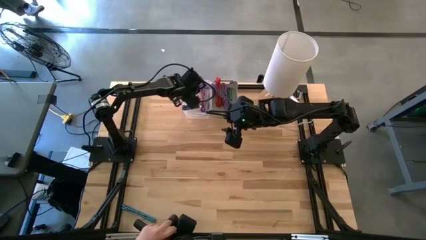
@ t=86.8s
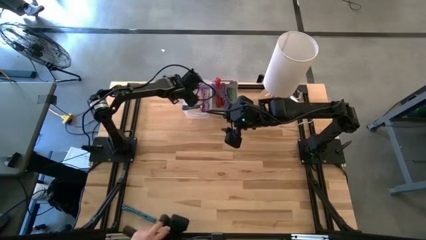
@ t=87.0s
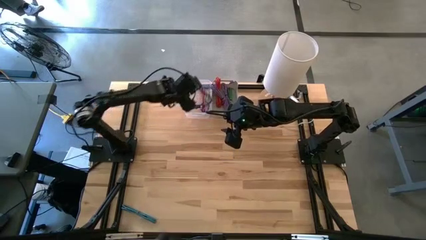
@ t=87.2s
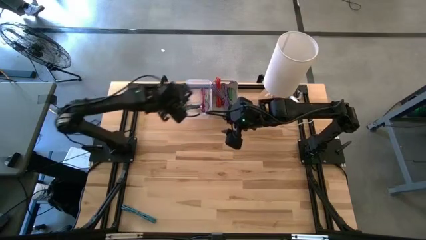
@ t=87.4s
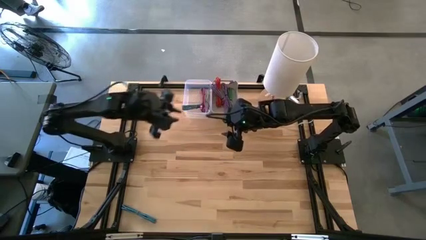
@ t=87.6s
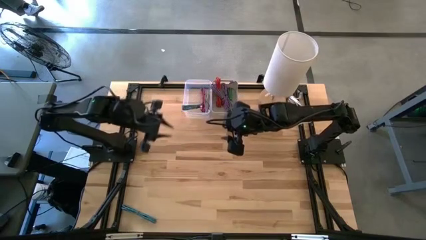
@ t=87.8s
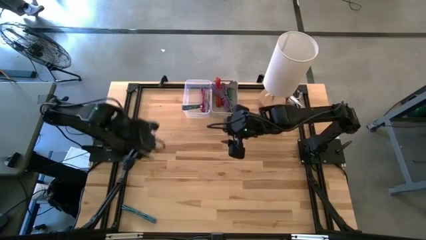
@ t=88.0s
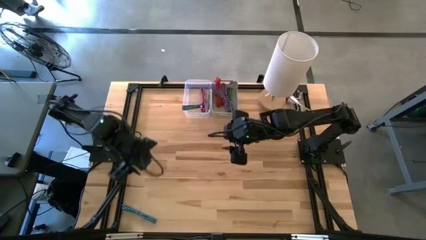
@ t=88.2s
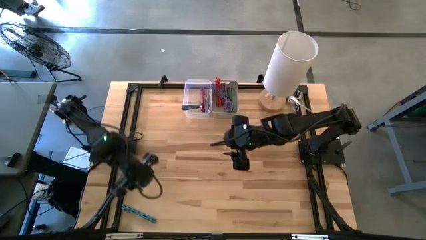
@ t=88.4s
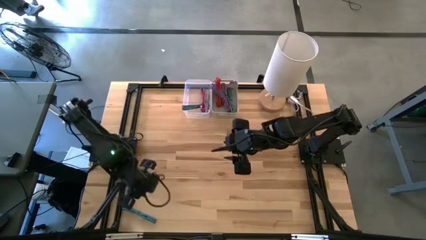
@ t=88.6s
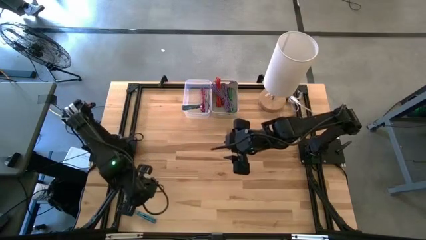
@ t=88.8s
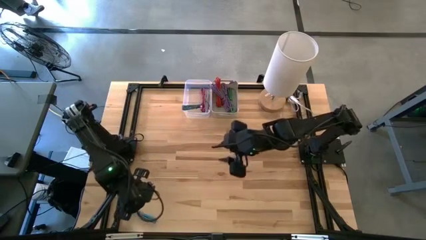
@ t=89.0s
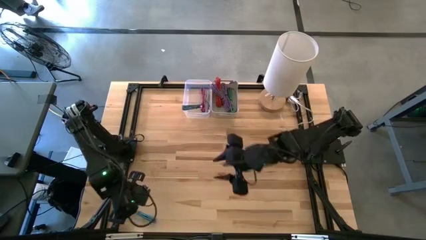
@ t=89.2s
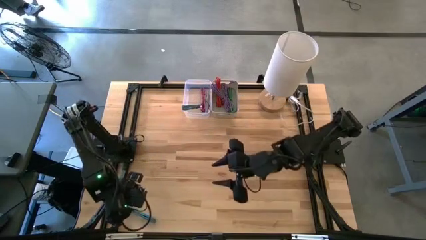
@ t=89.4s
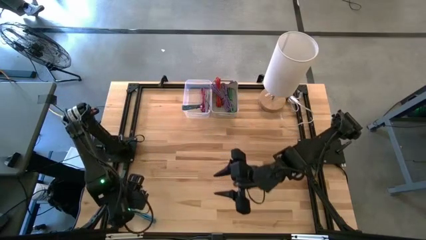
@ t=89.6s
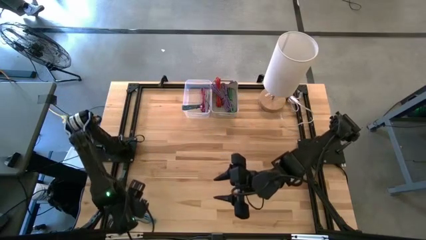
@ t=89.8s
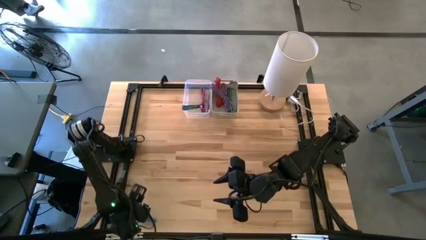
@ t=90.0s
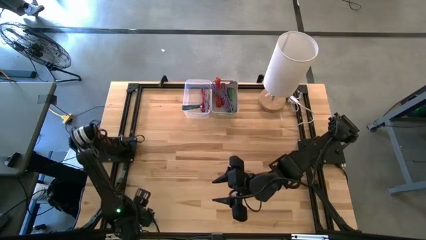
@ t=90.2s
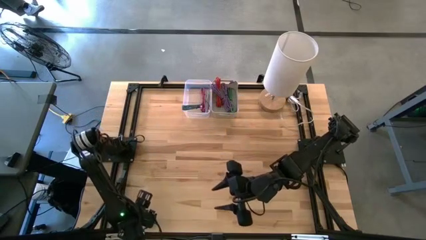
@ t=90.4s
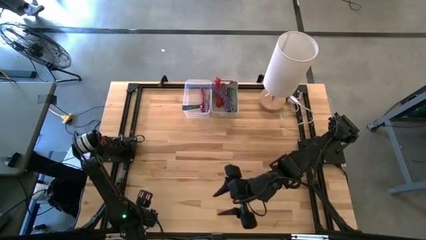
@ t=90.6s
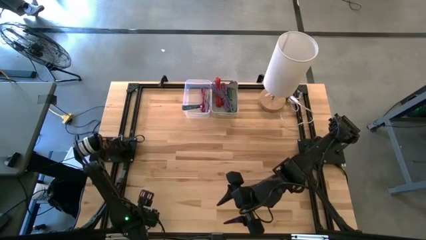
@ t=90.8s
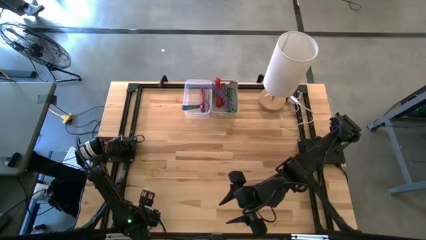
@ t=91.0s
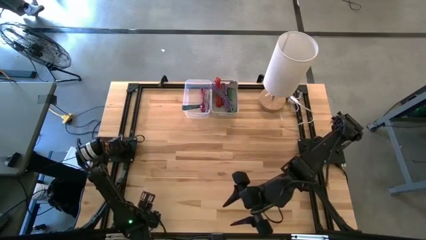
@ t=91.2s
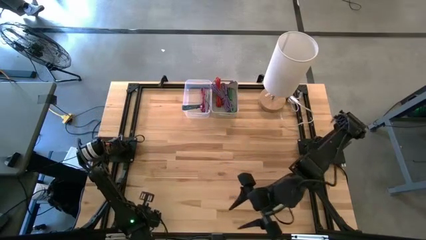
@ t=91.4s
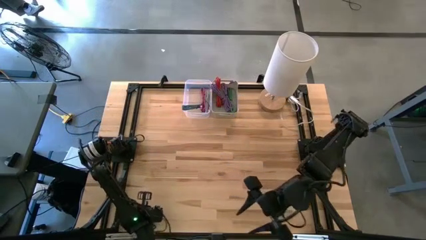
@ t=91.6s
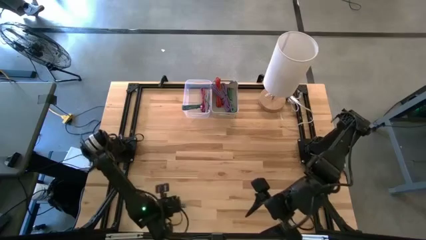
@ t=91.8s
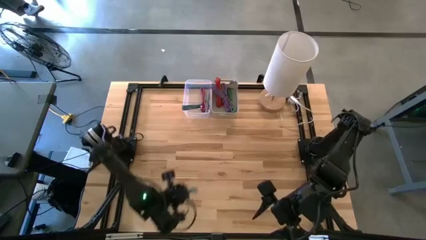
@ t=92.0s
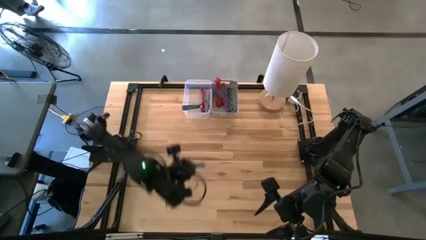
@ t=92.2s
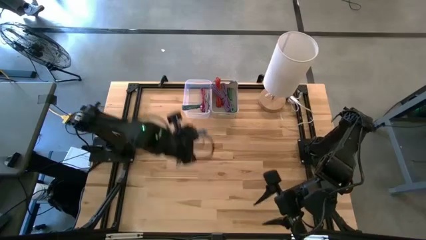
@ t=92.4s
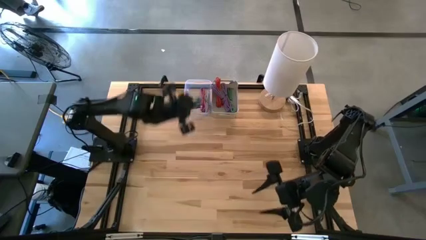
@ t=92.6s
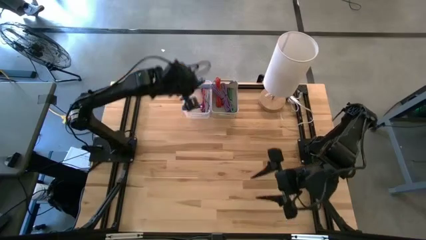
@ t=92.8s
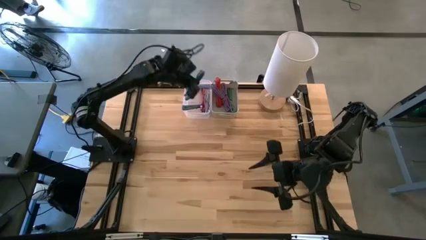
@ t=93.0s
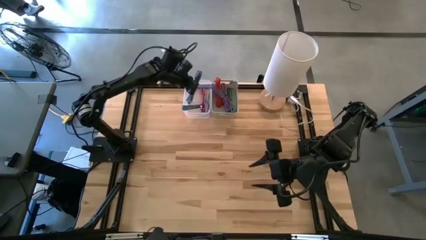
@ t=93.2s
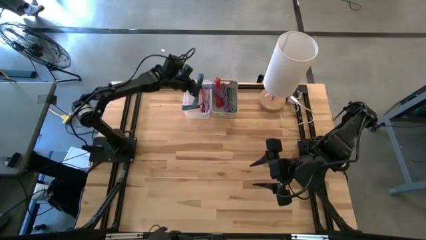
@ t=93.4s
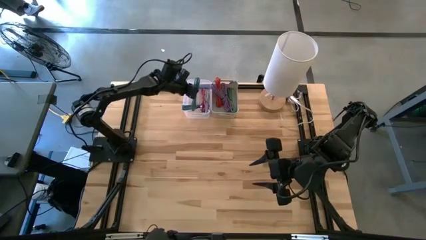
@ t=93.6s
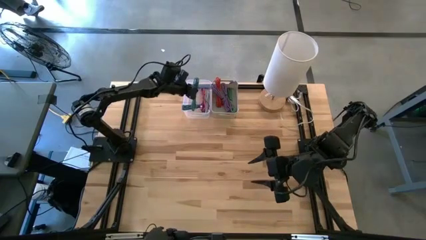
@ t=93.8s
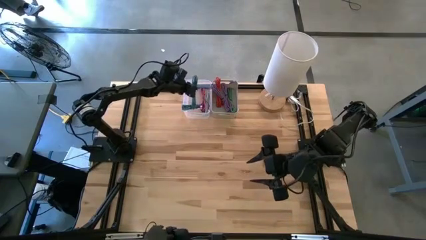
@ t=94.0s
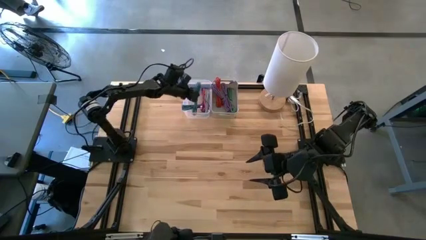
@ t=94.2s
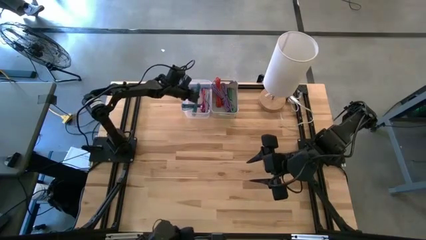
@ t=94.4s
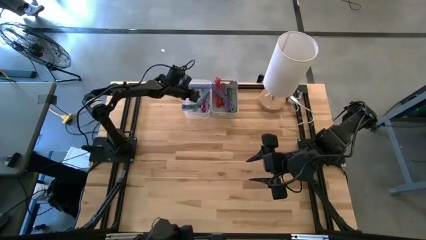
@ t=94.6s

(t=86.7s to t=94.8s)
Task: Pick & Place USB Port
Put the blue and black charger cable into the transparent bin

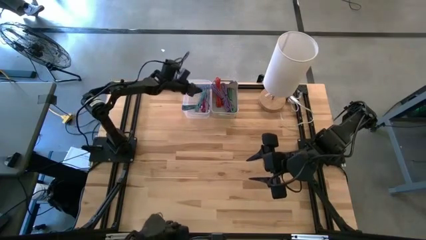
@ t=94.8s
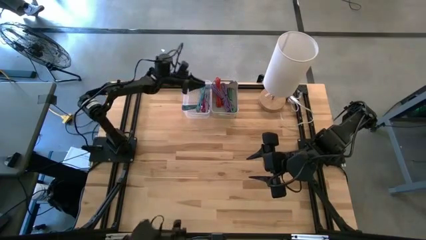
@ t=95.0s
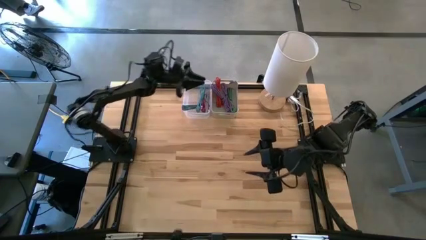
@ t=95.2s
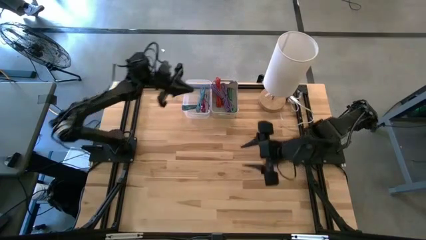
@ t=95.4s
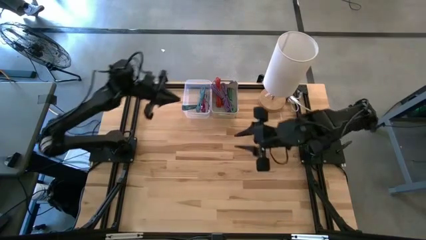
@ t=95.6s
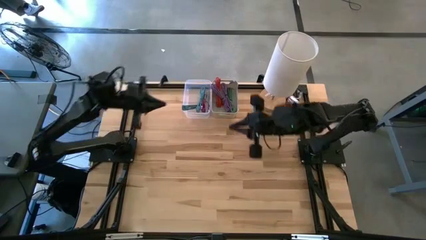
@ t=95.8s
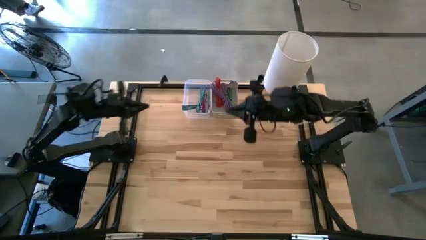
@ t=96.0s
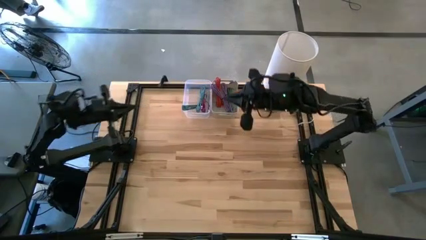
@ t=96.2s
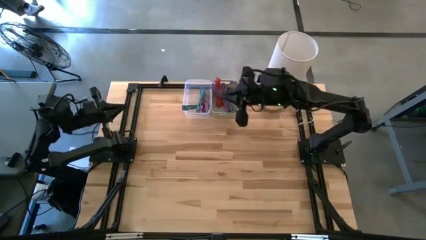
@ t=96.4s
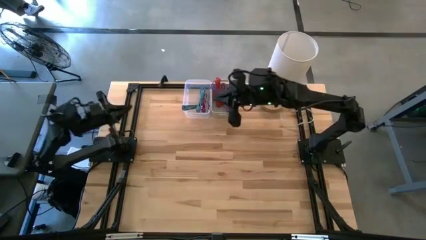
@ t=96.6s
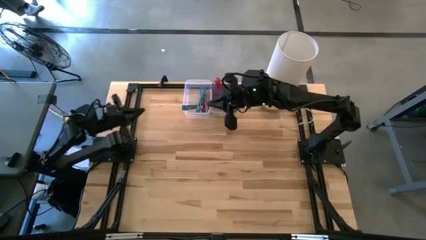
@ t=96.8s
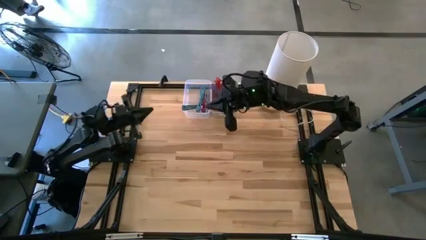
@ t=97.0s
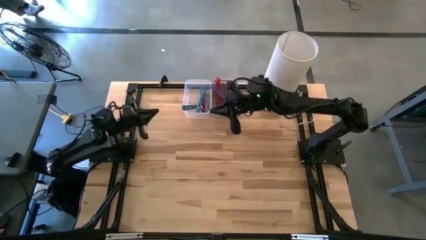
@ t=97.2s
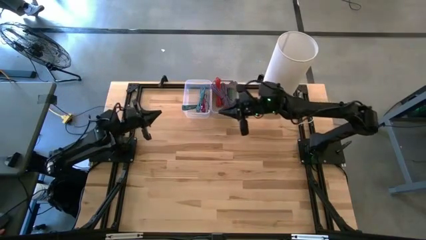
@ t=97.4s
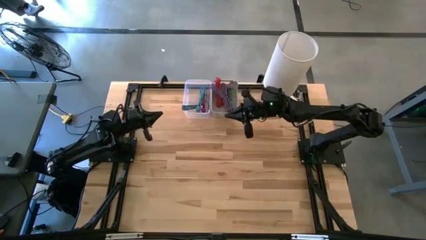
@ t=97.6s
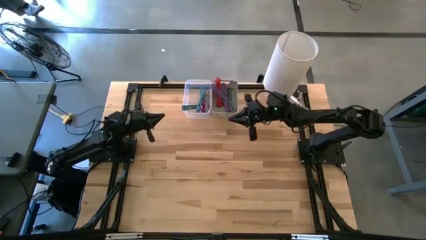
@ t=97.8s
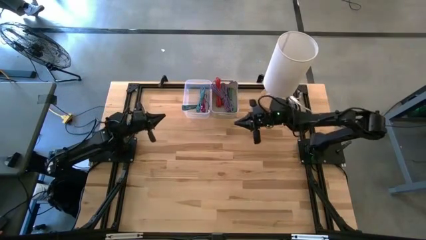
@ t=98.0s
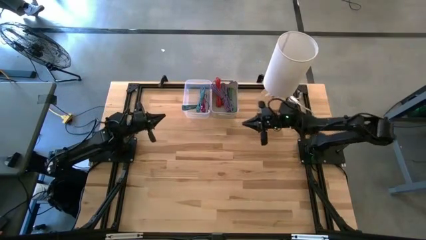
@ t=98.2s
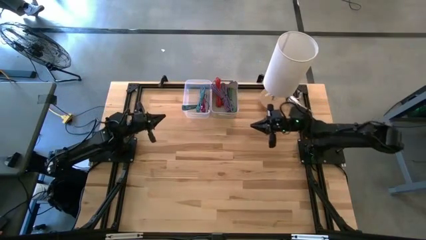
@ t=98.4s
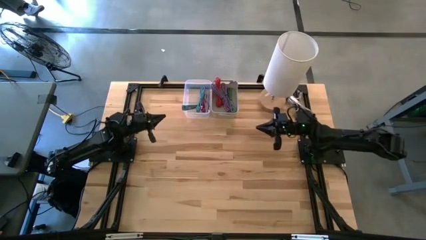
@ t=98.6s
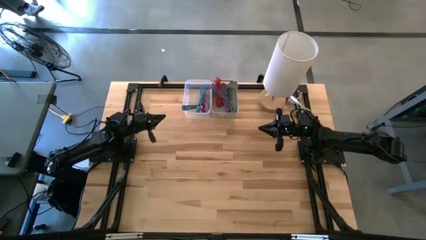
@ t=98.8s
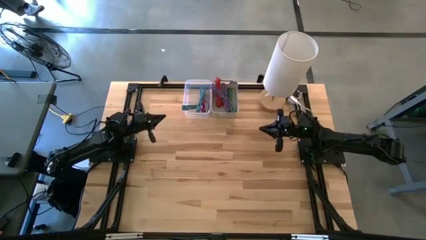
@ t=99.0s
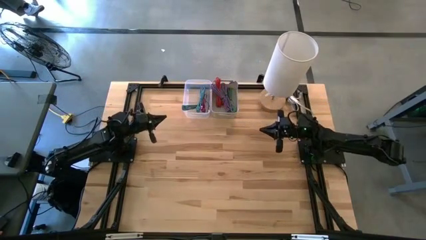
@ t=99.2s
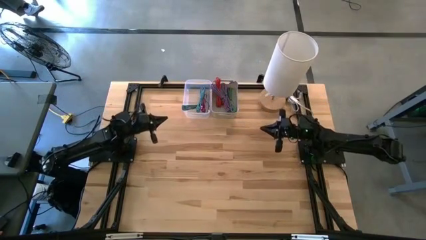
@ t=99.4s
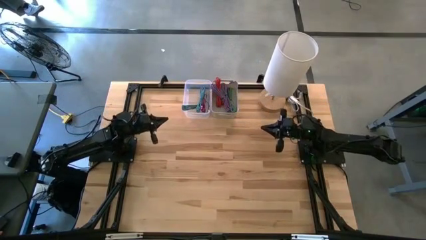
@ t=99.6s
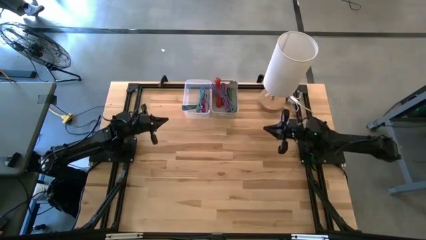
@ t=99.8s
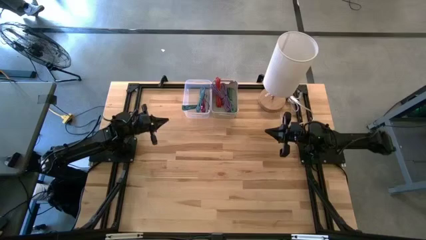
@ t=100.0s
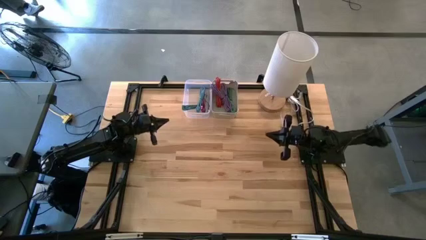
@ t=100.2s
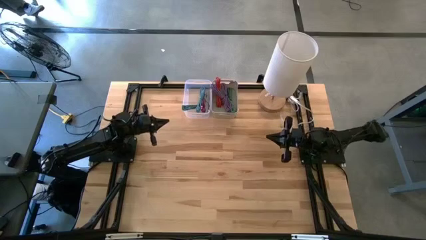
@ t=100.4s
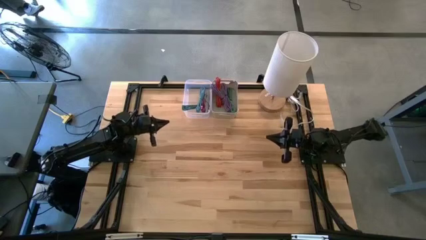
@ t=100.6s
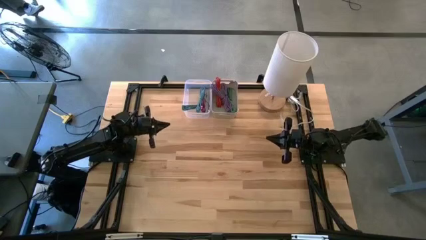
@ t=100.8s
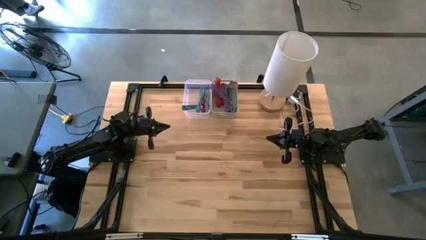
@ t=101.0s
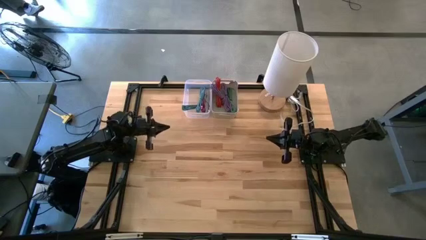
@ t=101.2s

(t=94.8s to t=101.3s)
Return to Home Position

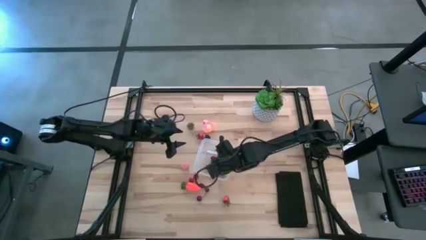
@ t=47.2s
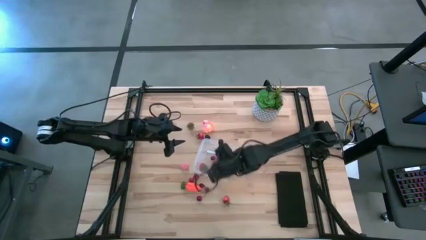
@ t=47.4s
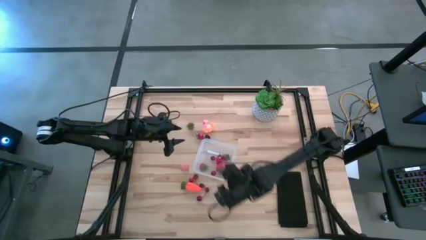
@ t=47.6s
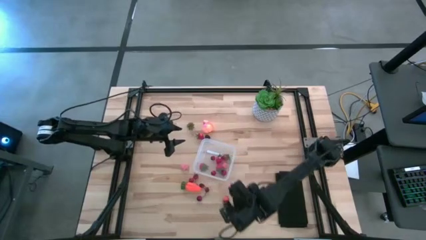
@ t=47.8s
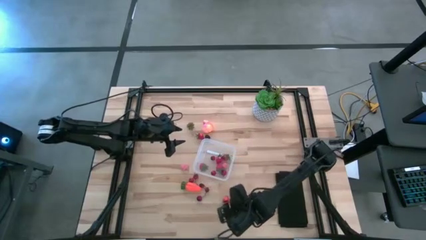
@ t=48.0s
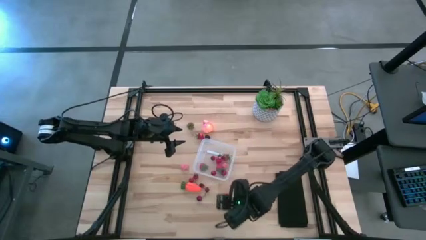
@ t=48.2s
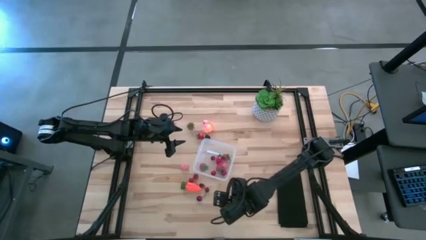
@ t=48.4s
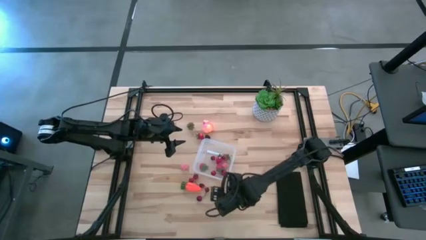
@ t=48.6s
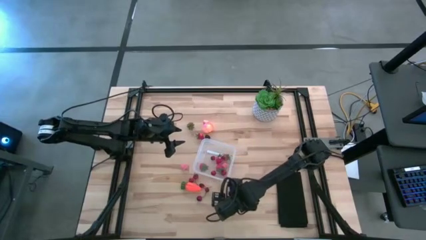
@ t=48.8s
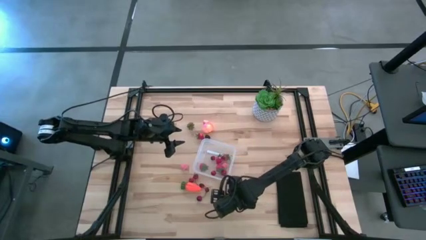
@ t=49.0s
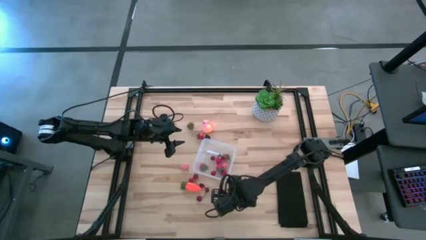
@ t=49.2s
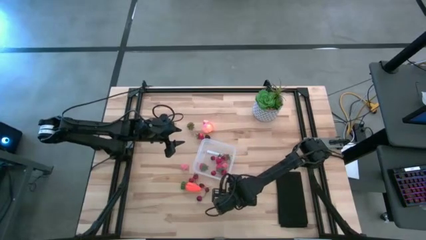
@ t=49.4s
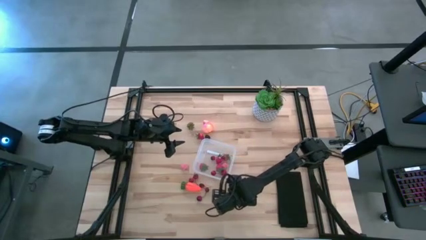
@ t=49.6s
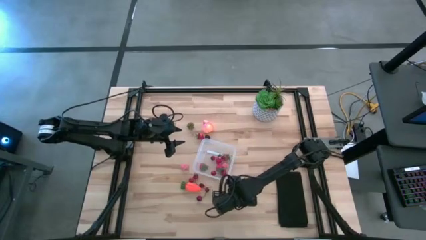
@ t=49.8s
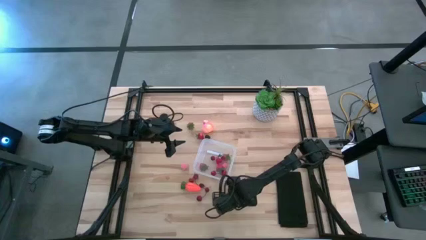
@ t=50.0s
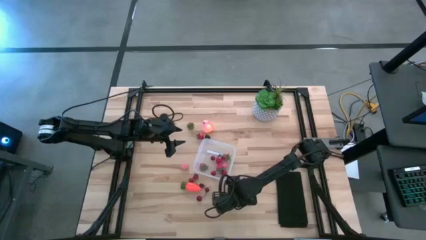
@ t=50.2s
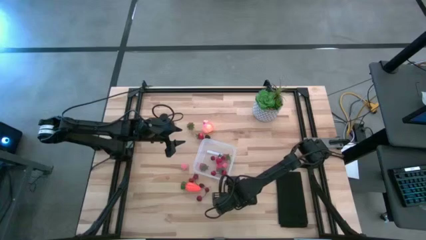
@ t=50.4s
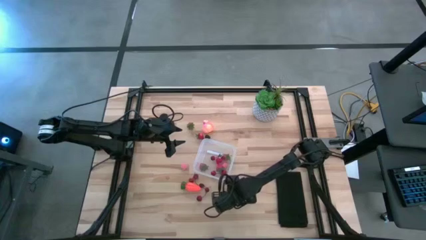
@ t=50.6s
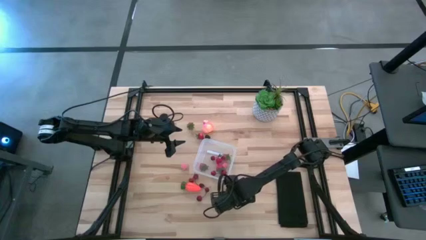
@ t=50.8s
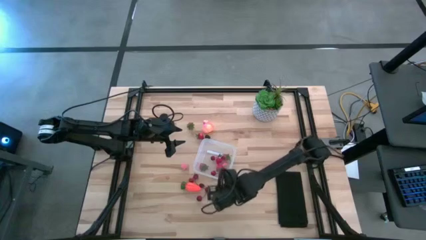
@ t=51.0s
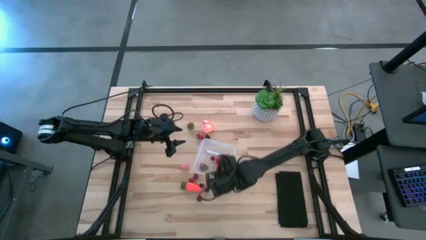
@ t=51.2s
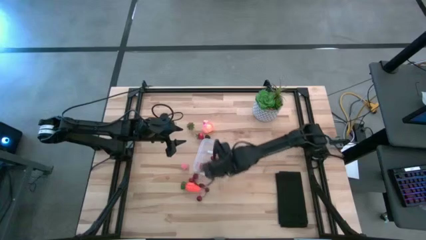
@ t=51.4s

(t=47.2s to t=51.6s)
Task: Pick and placing Produce into tupperware
Put the red strawberry into the transparent container
